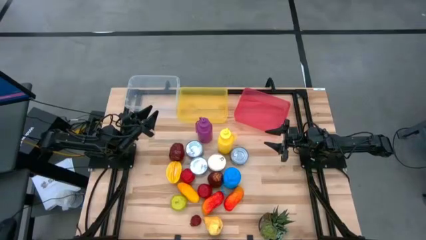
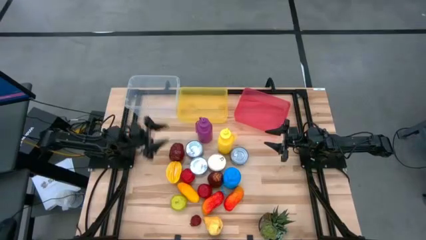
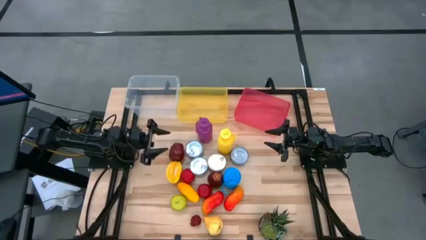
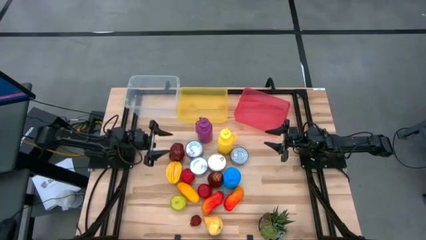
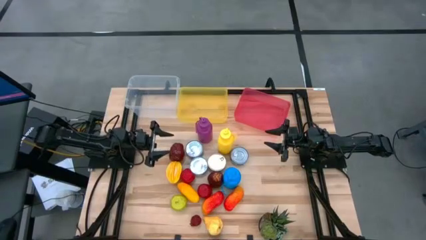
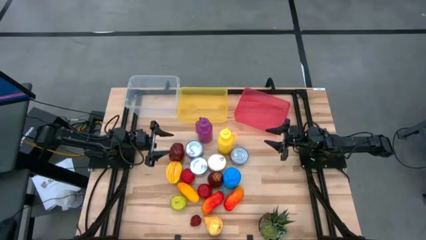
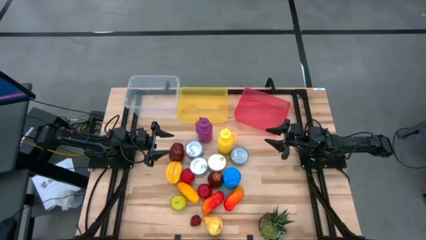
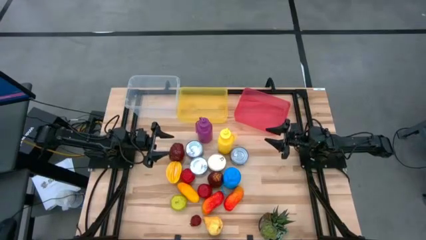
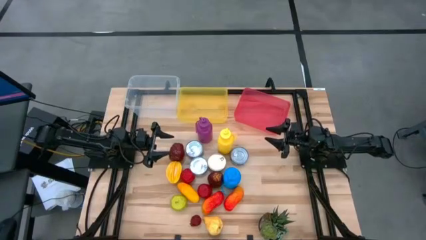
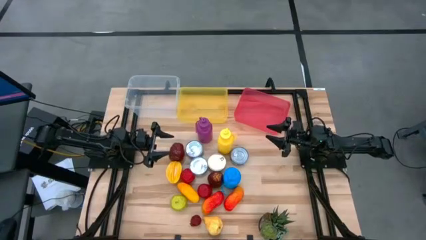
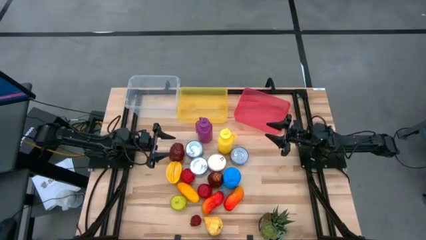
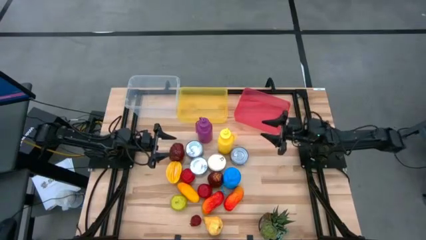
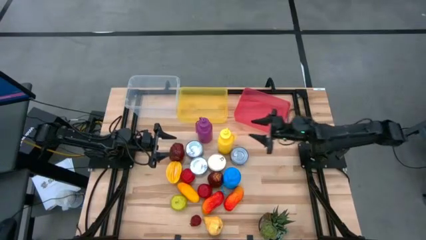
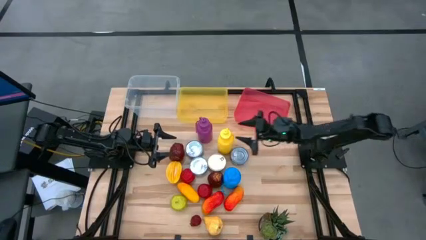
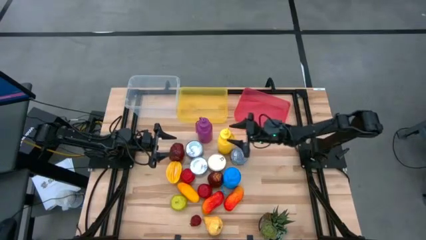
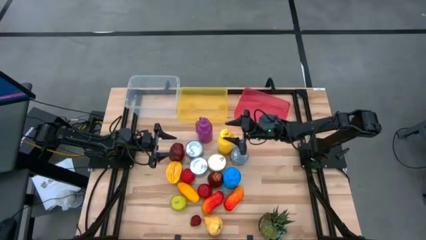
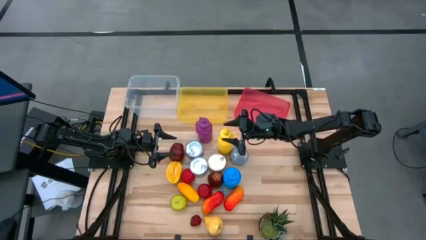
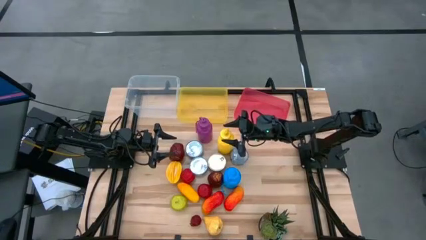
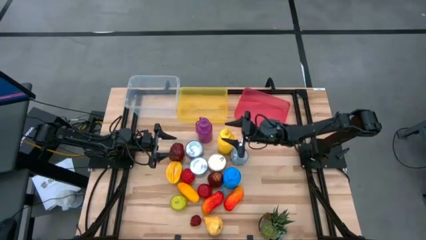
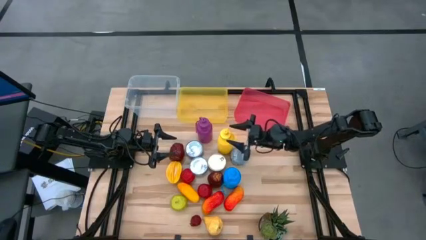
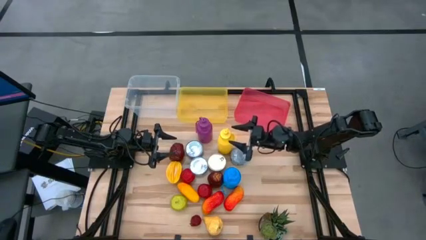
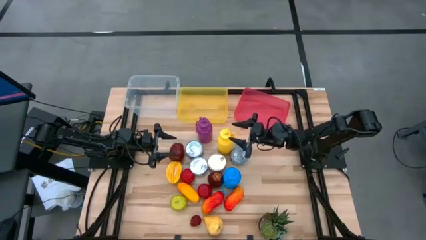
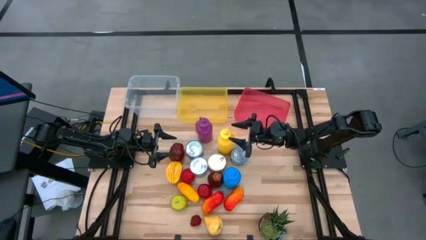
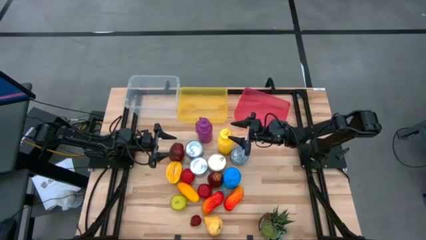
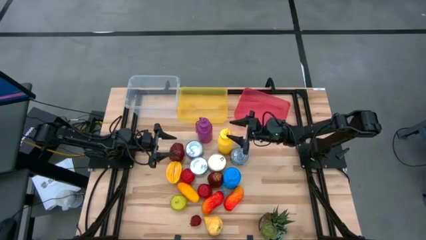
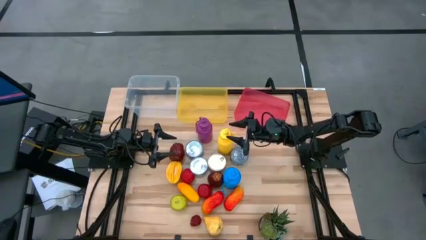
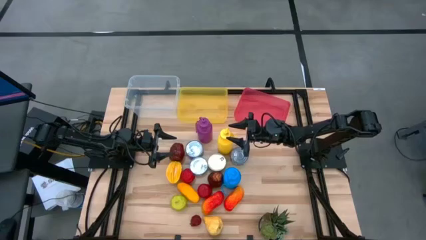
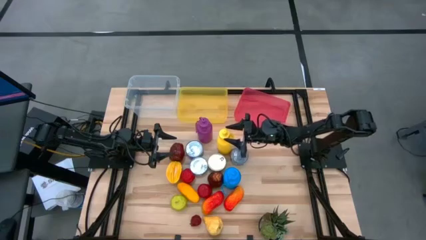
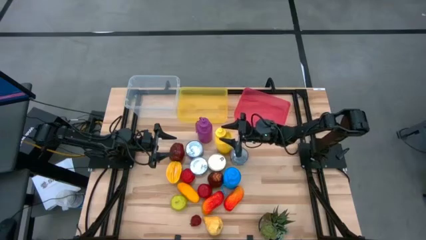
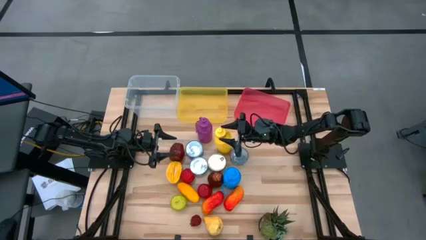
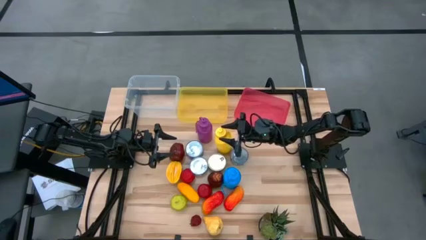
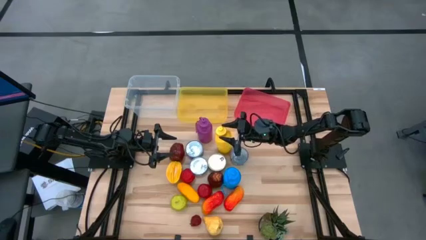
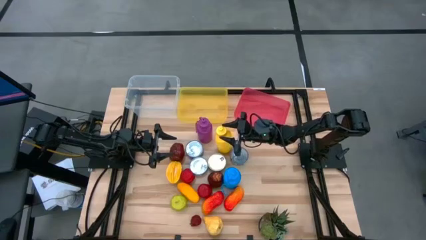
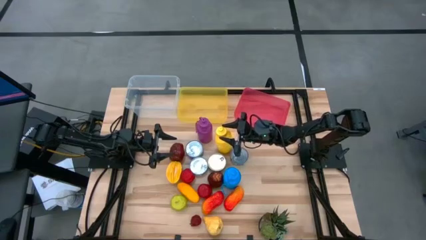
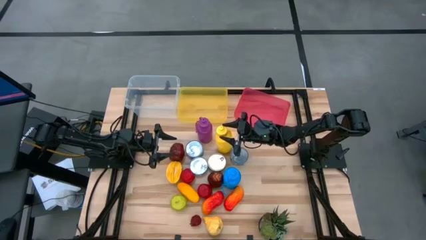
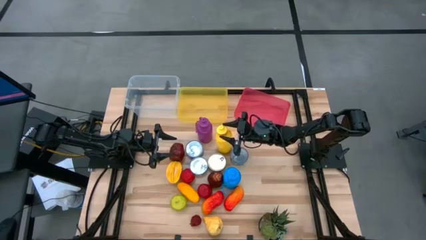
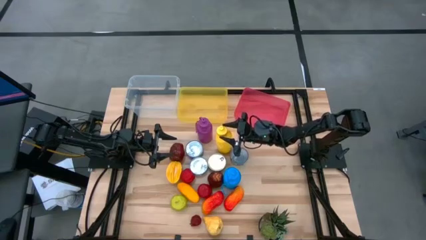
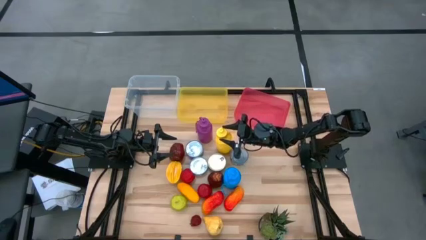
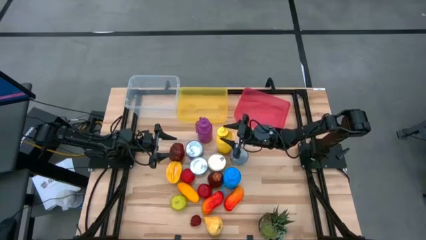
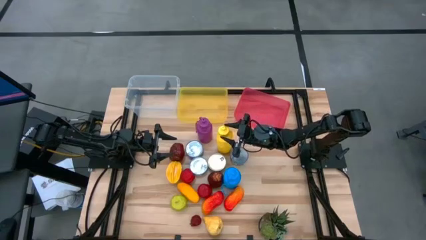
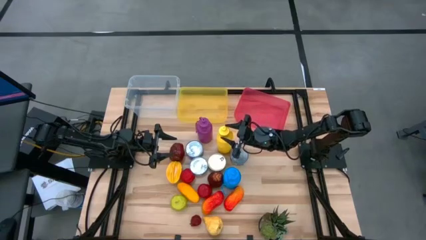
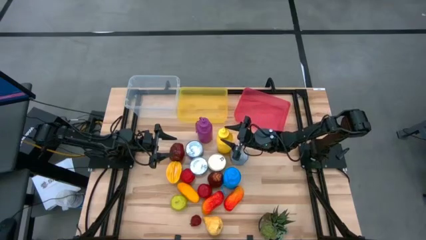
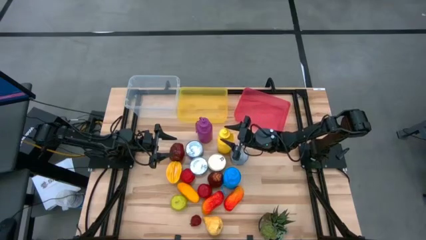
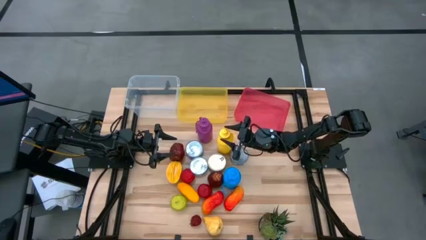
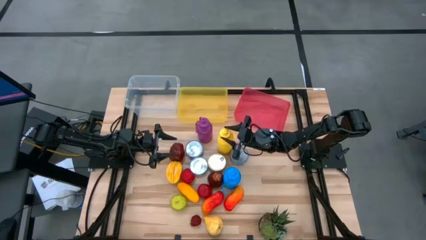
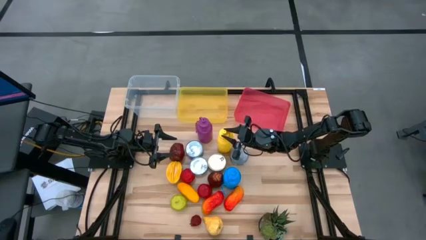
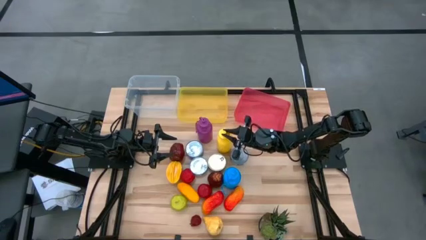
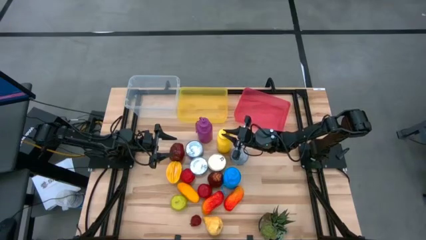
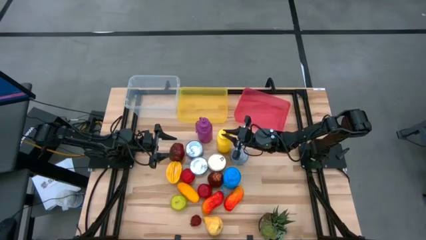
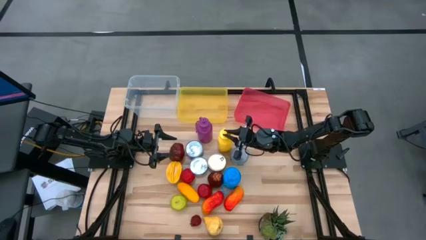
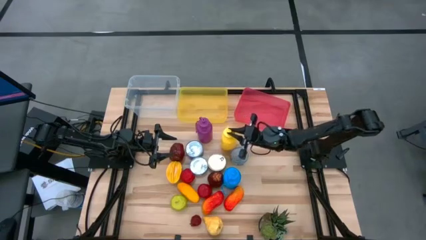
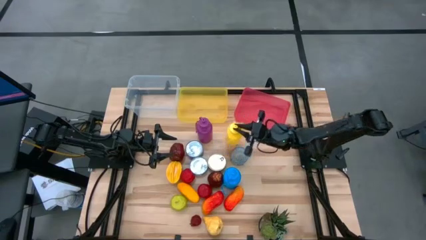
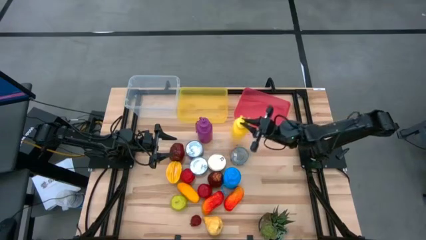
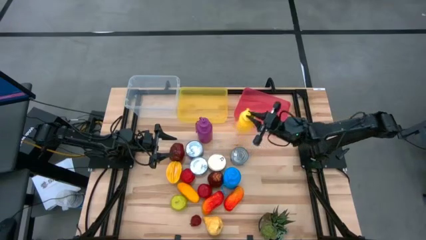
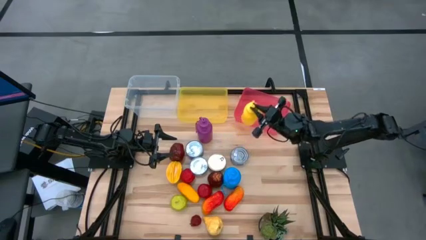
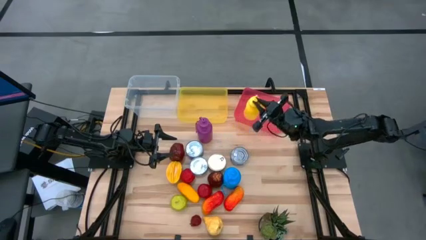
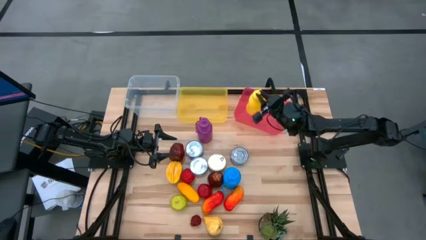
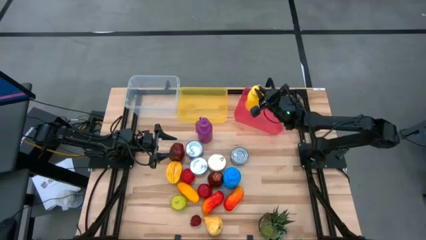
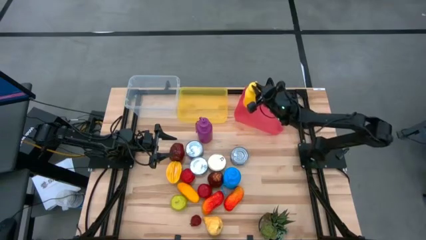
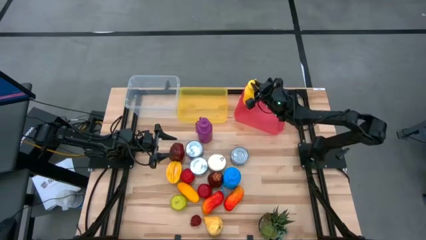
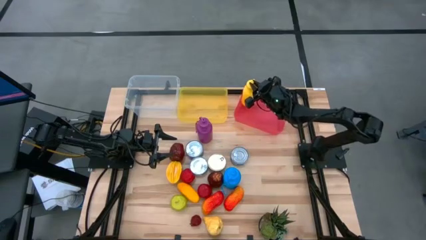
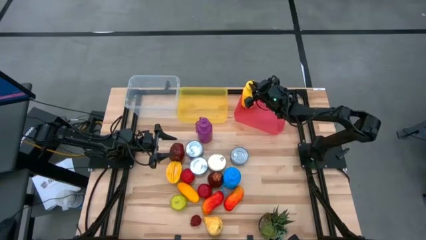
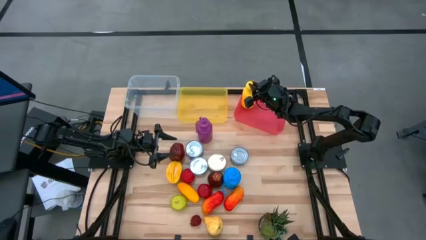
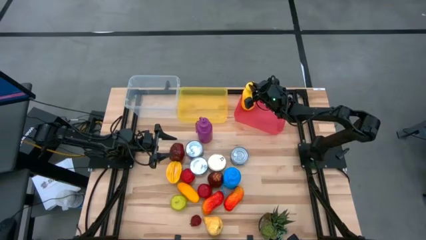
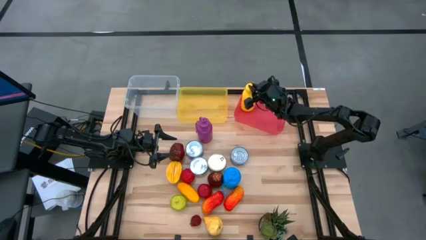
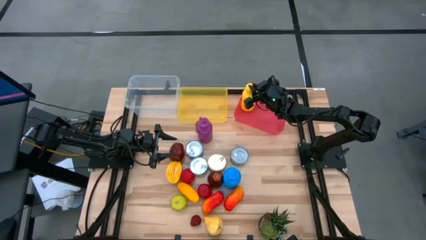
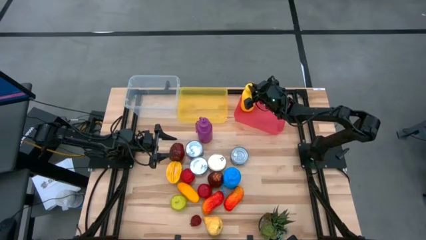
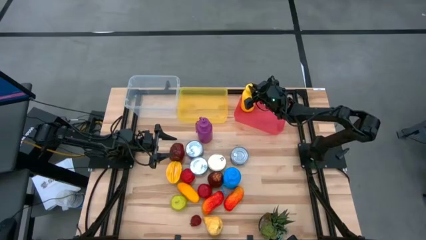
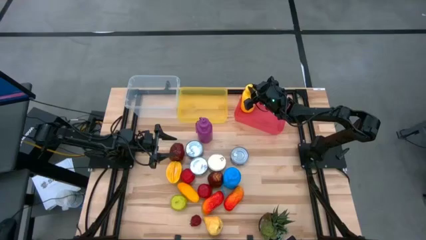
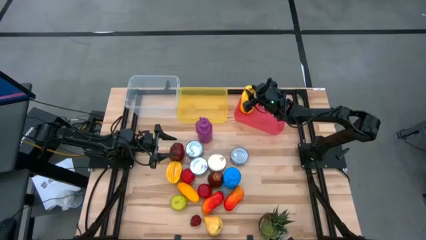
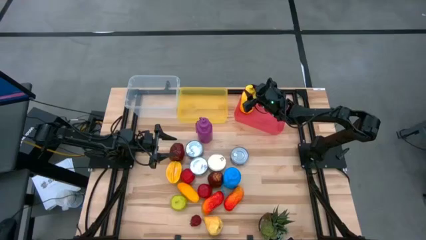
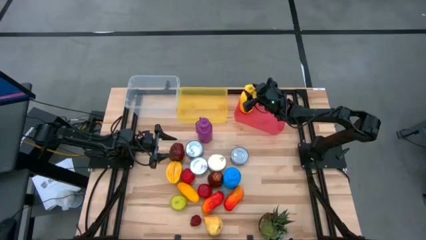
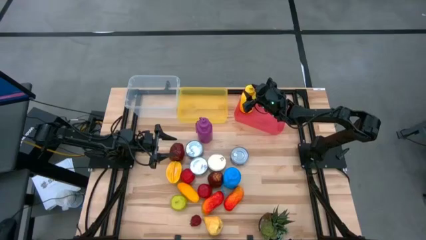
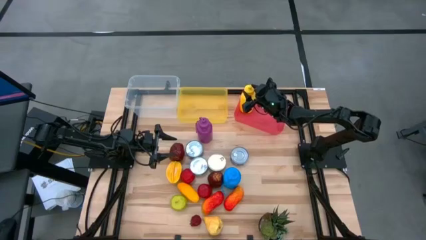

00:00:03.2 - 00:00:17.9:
Task: Pick & Place Food Item
Put the yellow water bottle into the pink bin

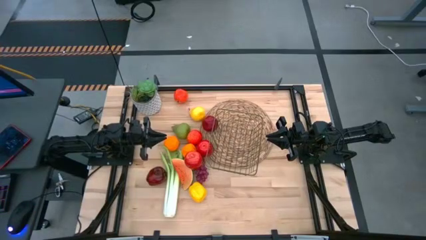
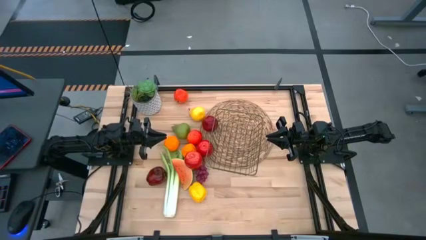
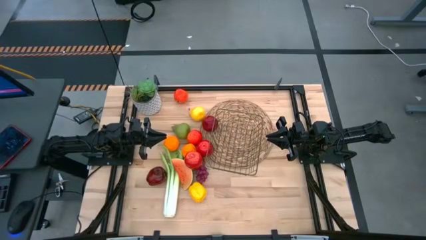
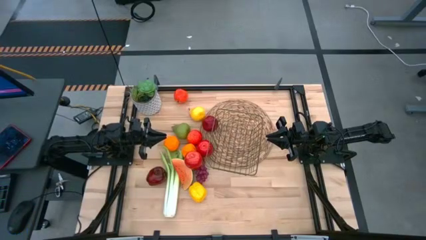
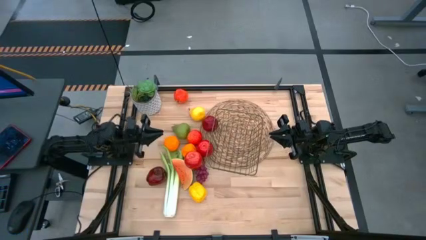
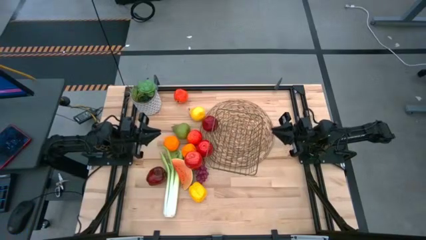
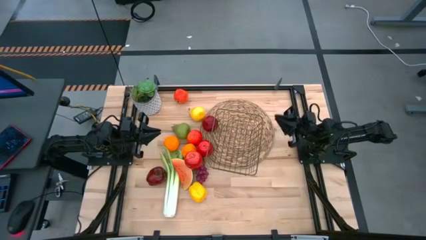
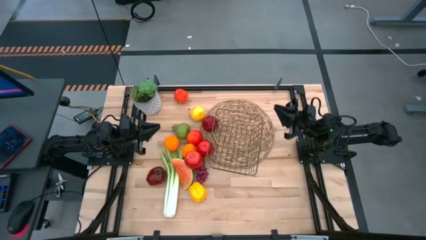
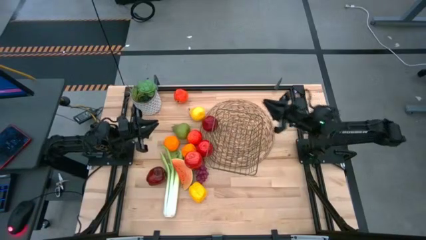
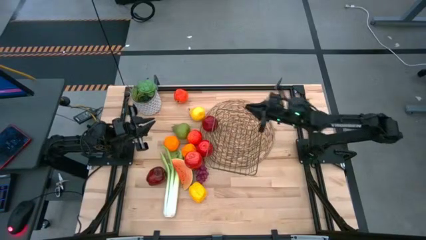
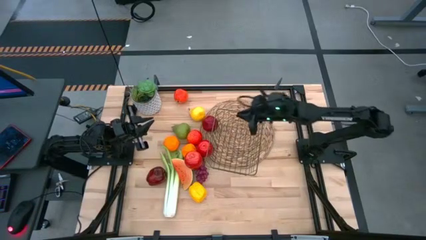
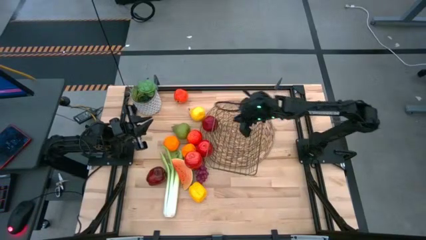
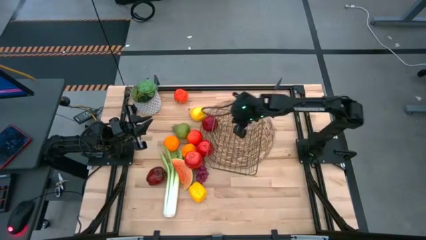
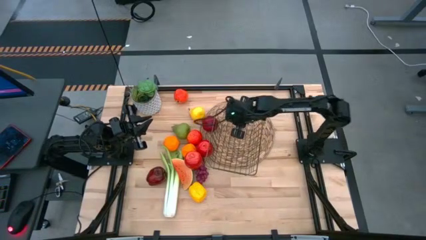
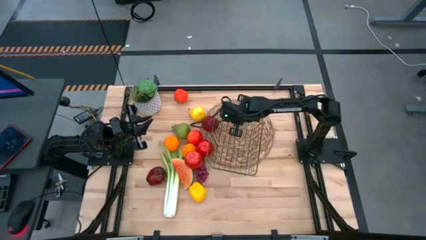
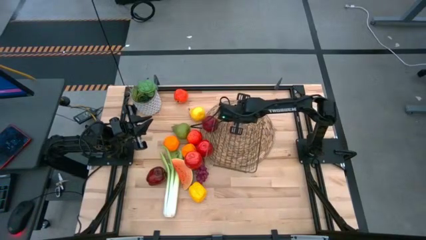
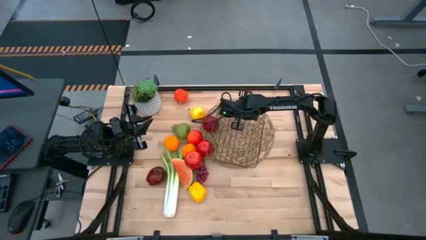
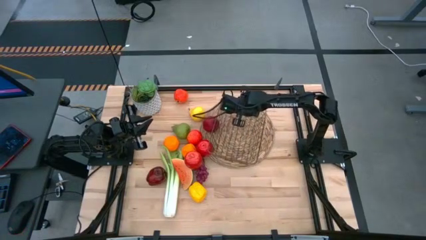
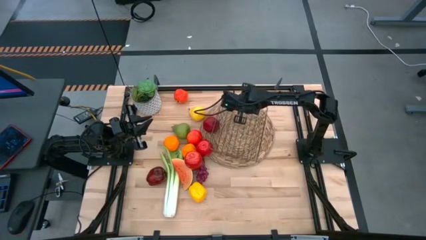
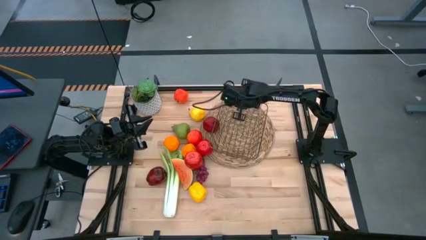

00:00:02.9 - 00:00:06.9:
Task: Build produce basket
Adjust the gold wire basket on the table
